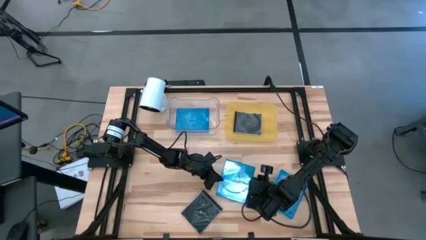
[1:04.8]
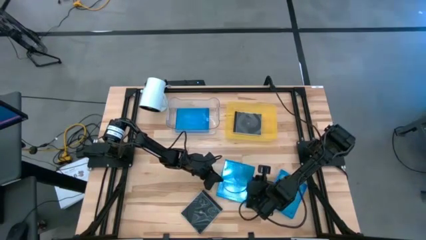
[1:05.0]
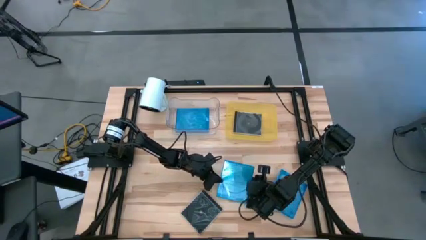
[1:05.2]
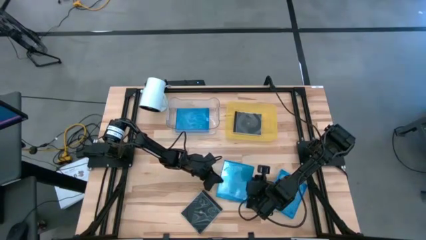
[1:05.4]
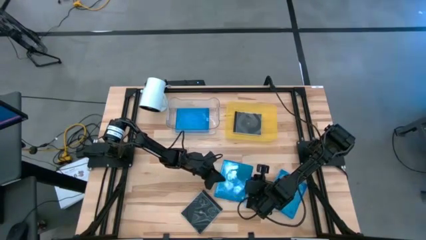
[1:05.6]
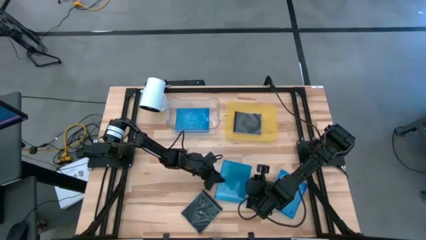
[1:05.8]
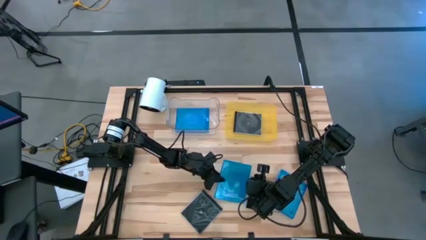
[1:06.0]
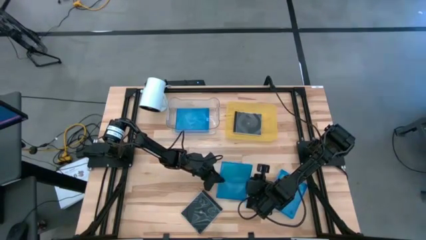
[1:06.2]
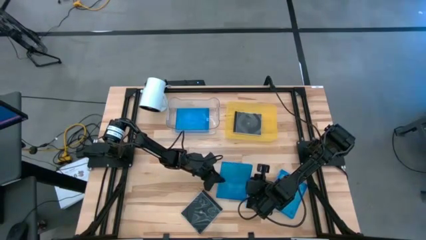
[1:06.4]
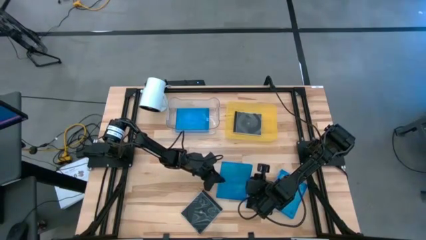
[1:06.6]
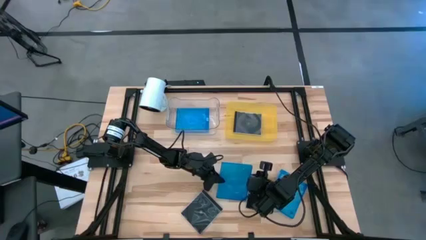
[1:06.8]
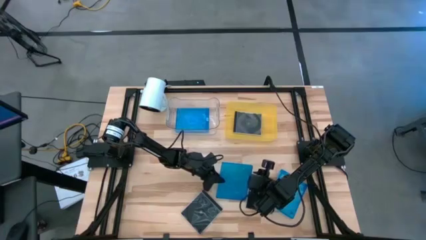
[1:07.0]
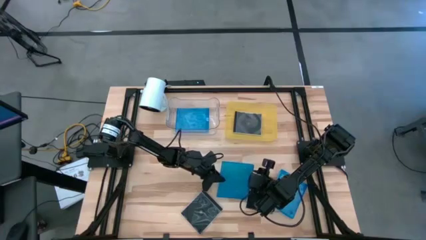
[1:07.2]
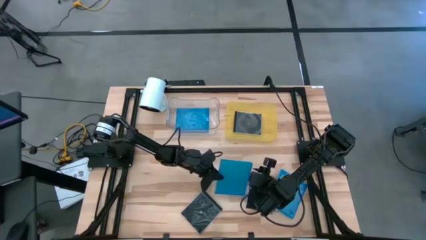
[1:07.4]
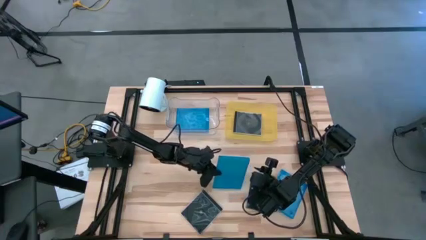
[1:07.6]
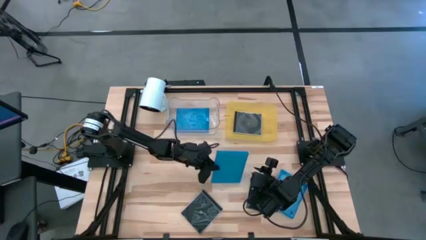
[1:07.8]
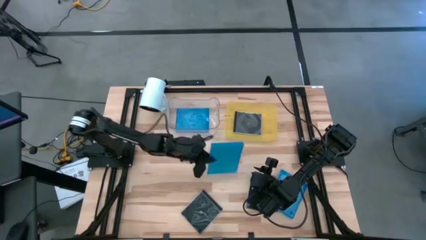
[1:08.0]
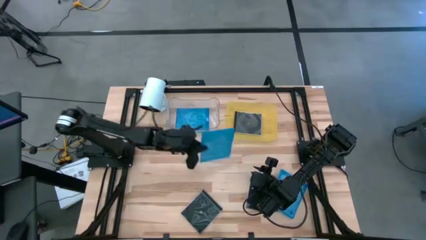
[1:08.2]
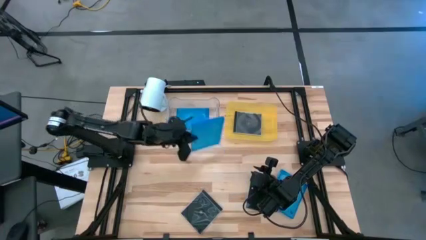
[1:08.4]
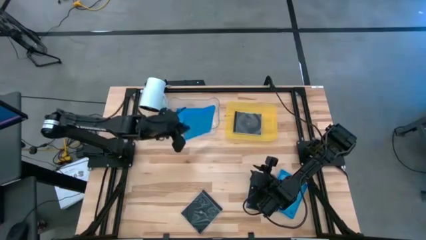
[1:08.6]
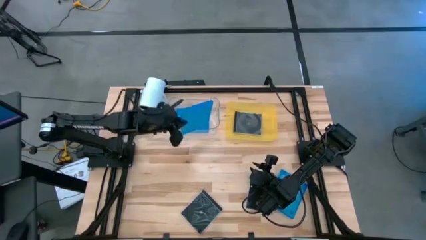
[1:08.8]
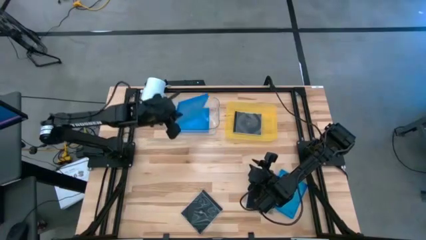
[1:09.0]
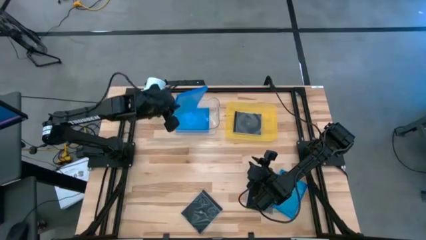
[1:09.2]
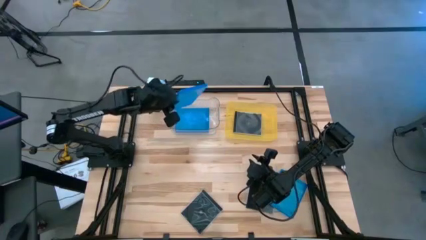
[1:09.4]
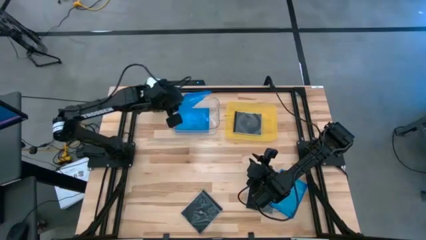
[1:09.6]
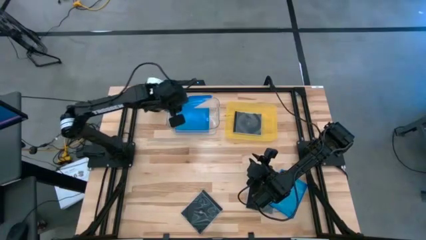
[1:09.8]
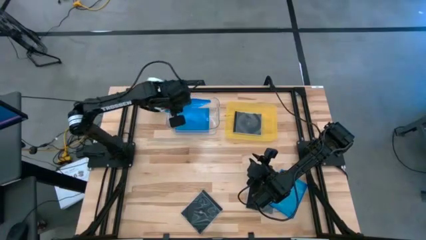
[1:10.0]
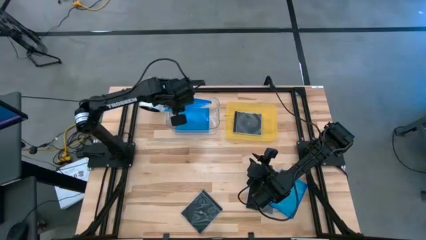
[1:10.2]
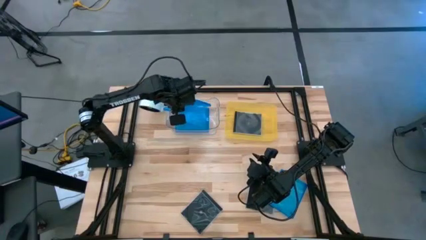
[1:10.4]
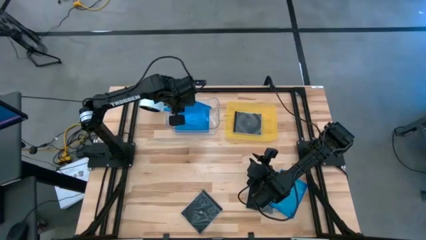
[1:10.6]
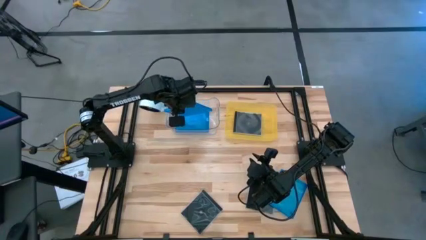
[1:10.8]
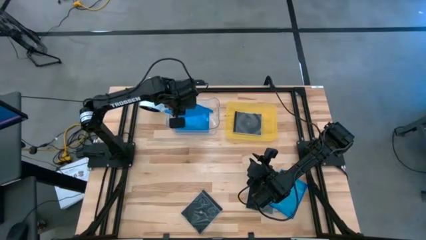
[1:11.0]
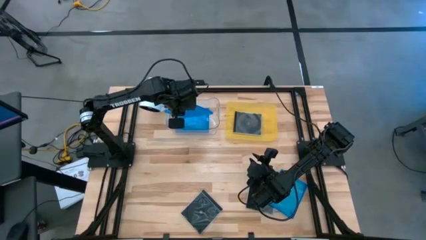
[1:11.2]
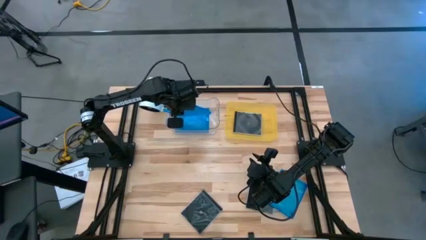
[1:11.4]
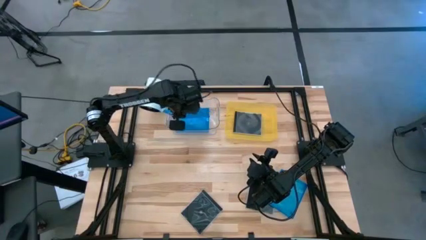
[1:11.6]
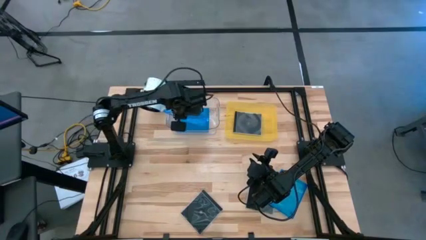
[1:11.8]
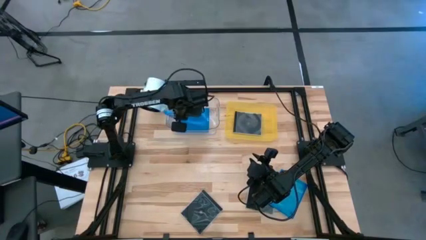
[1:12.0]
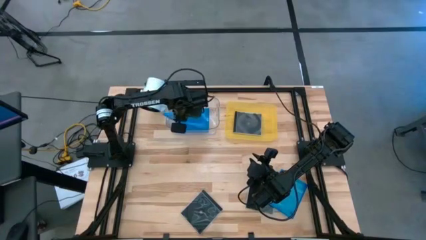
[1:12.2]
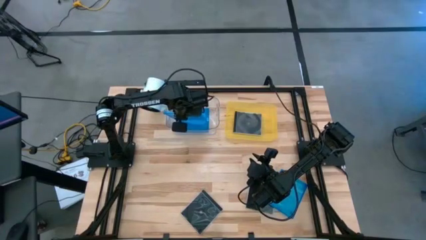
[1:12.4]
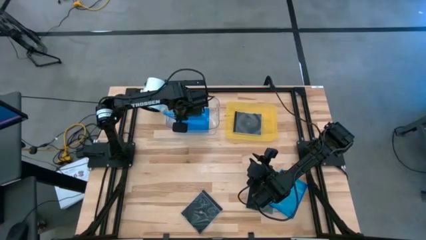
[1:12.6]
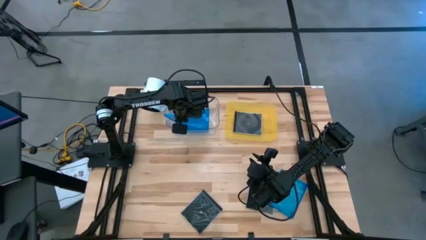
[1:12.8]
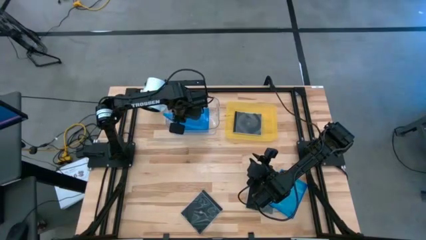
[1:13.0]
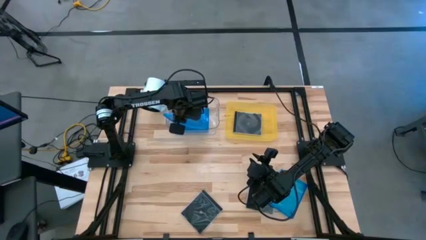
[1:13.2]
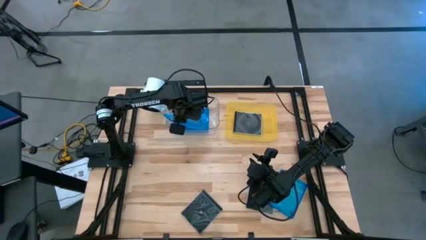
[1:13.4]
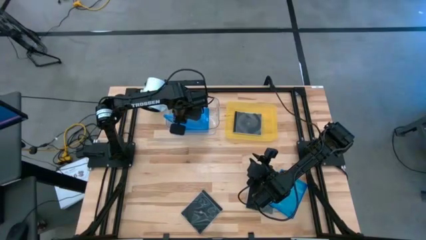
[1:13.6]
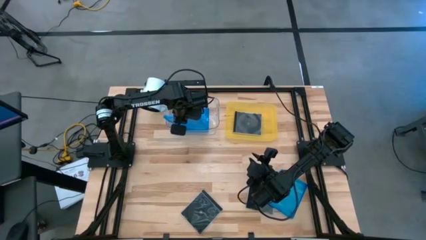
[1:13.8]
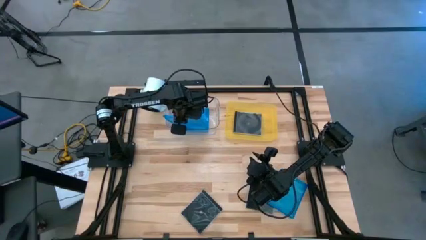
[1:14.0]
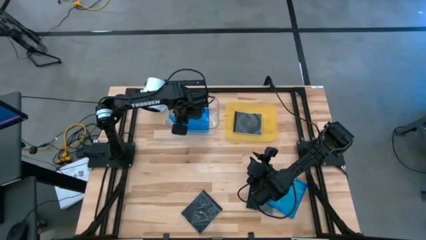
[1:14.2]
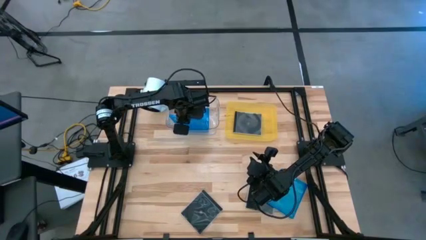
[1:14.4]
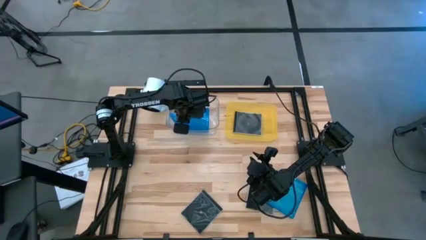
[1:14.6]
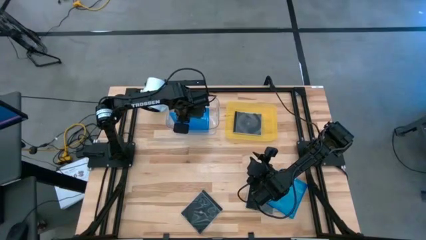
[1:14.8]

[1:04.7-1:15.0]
Task: Pick & place jewel cases by type
Put the left blue CD case into the transparent bin
